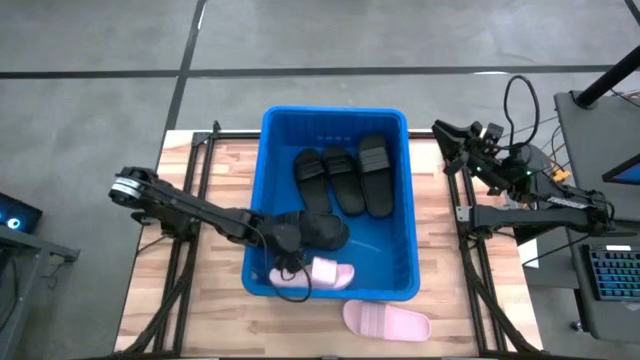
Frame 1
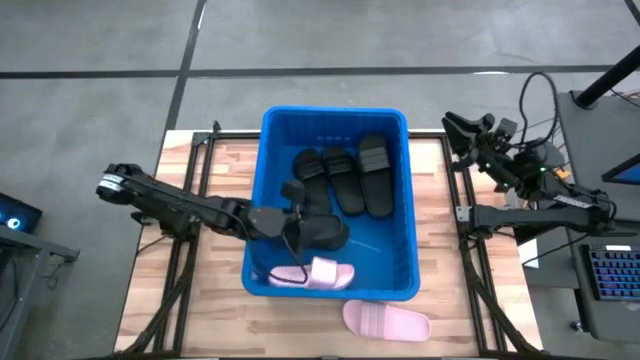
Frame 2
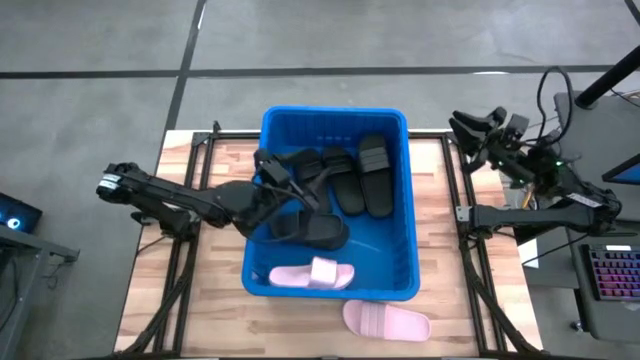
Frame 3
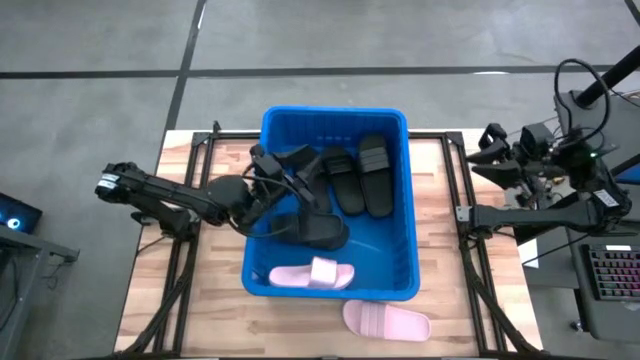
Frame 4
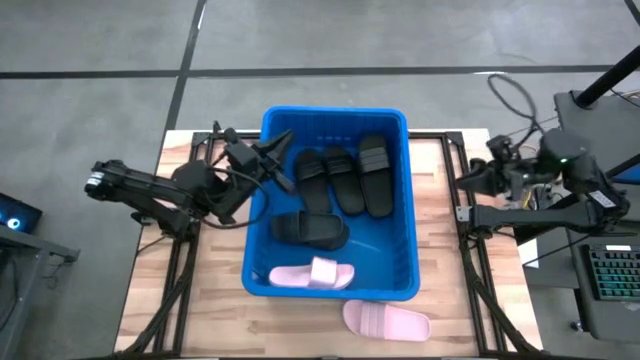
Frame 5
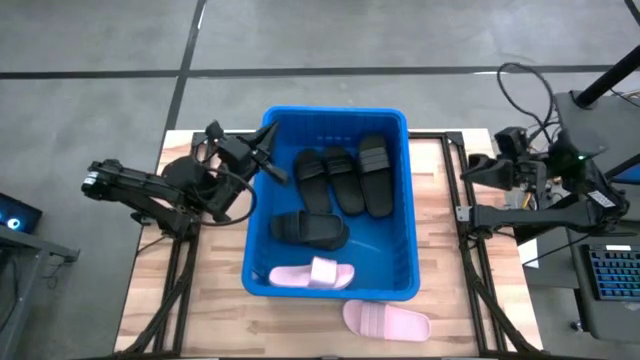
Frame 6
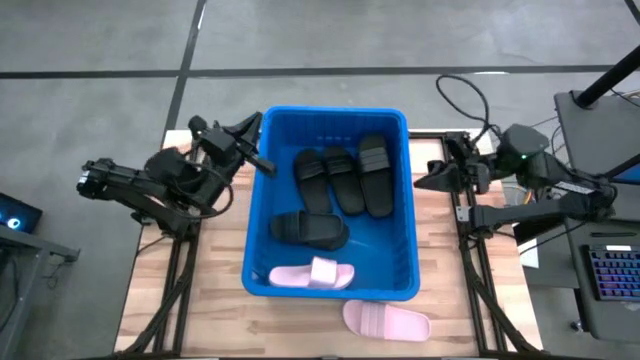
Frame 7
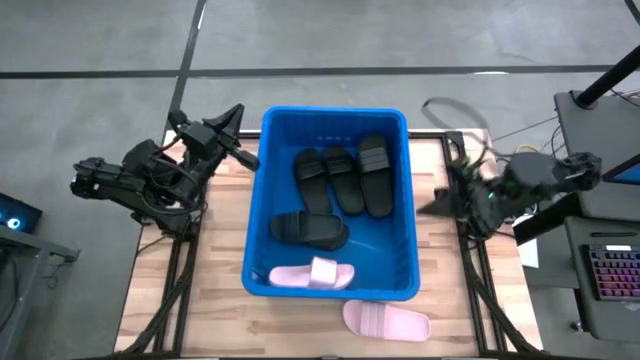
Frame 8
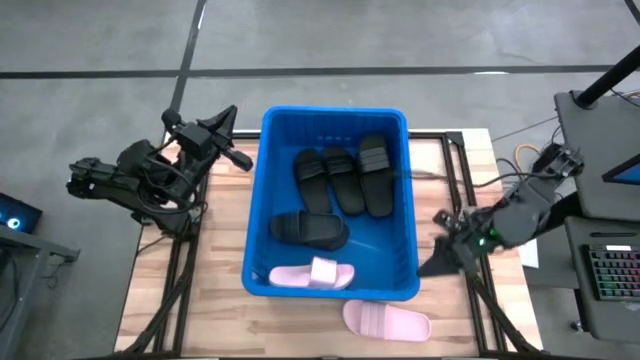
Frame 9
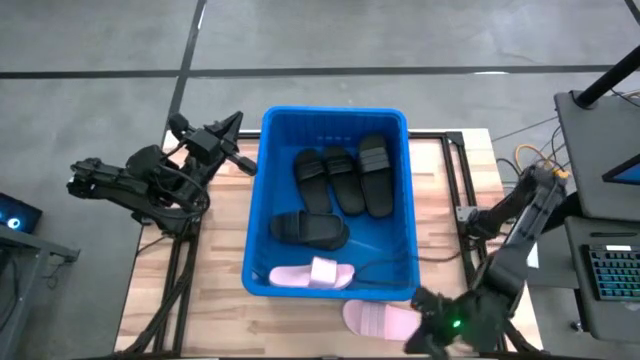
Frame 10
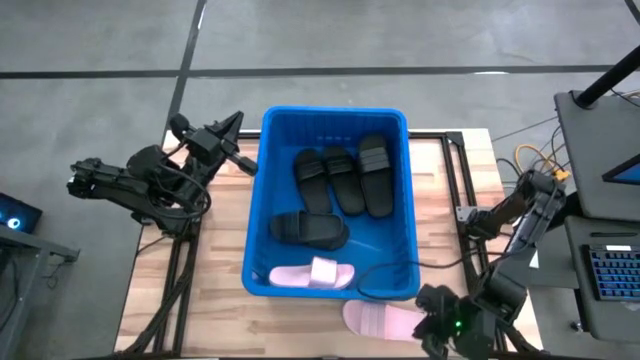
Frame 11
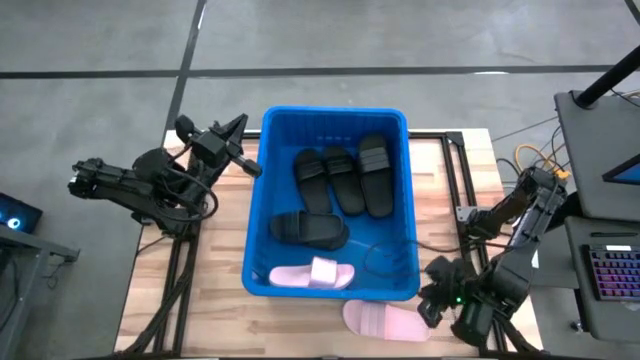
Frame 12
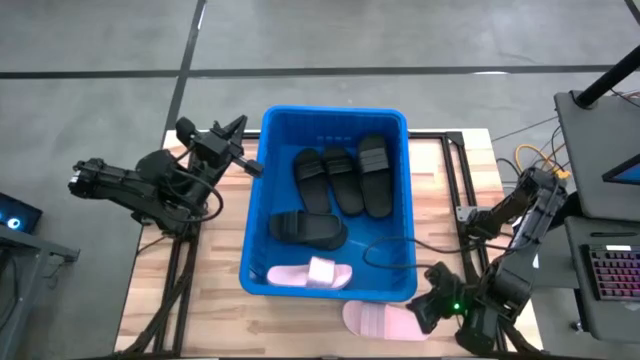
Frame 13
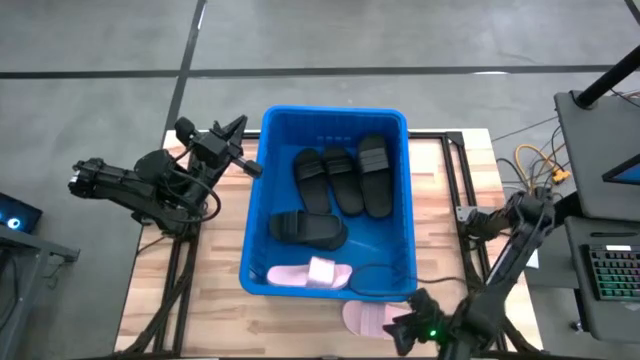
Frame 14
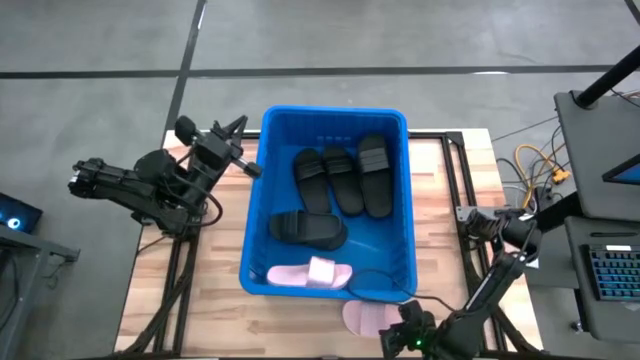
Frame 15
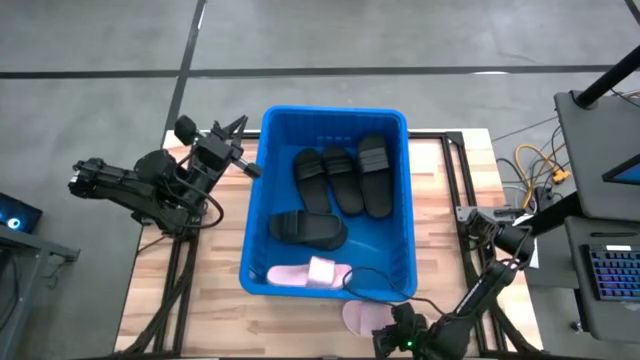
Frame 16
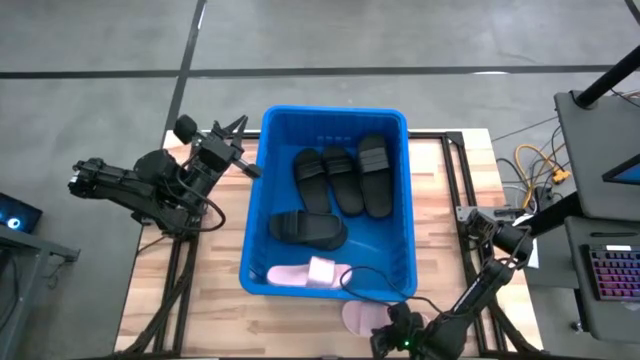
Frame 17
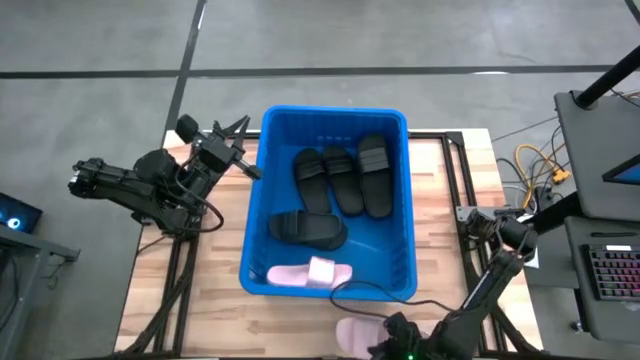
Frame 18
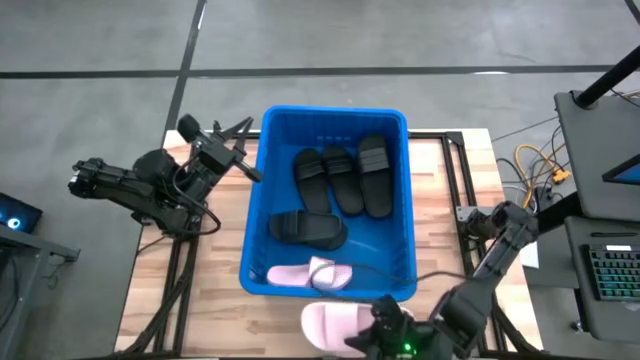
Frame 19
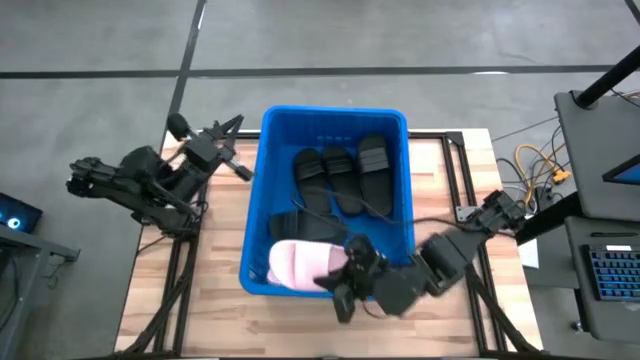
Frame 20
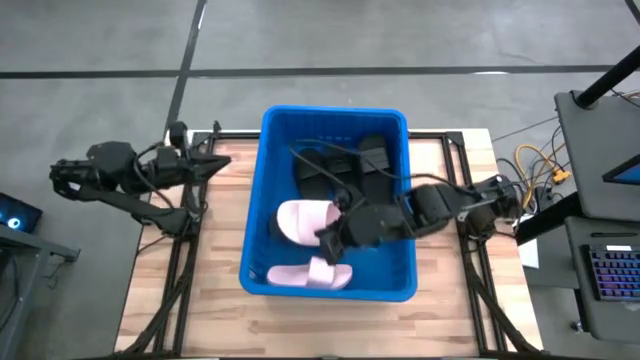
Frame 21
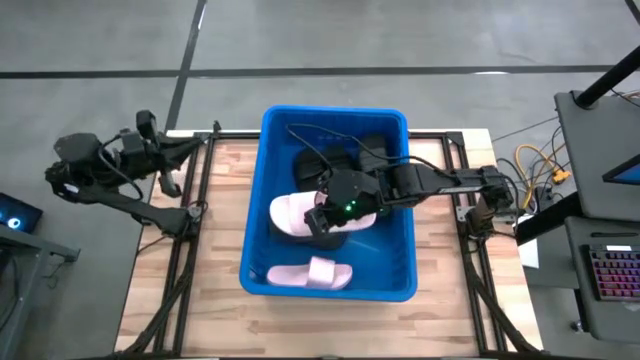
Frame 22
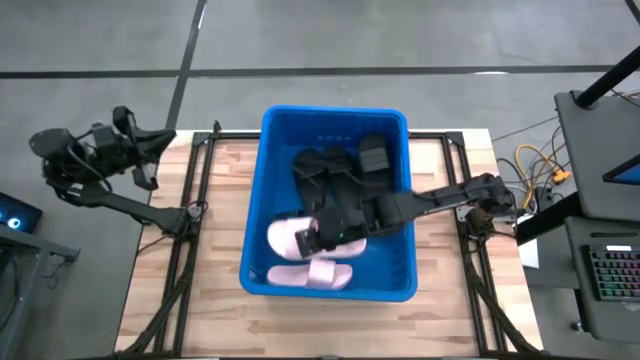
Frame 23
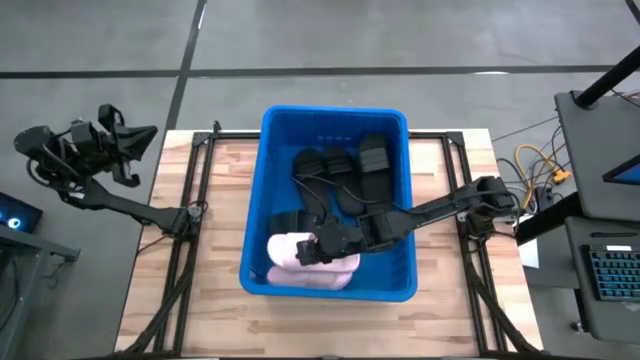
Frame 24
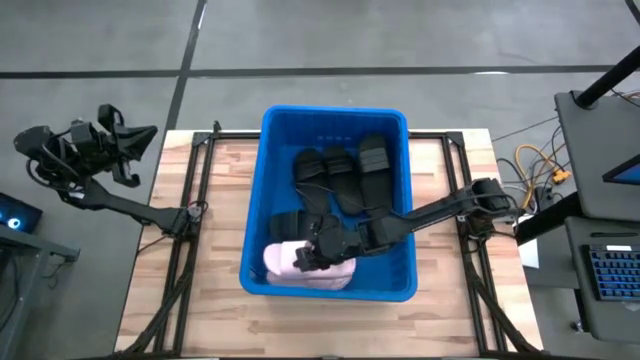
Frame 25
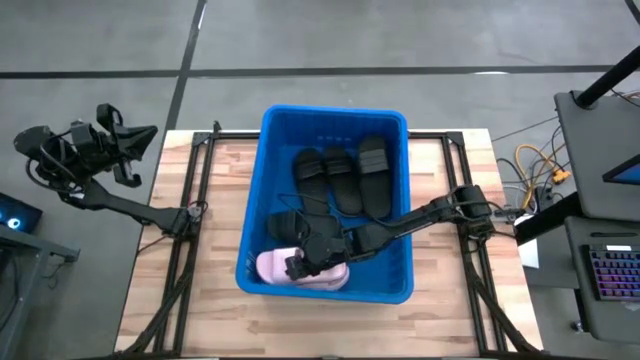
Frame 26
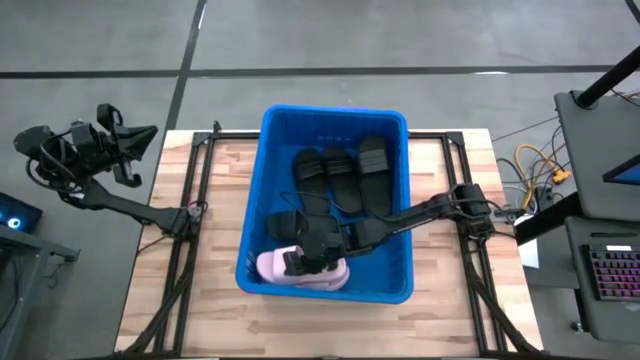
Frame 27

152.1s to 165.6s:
Task: Pick and place slides into bin
Put the pink slides into the blue organizer bin
